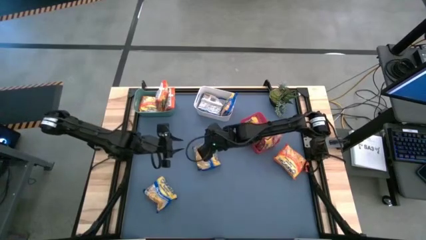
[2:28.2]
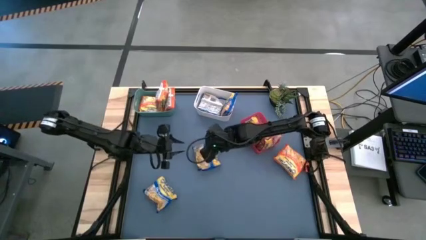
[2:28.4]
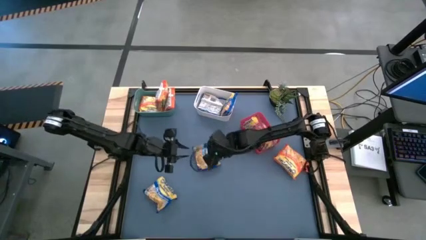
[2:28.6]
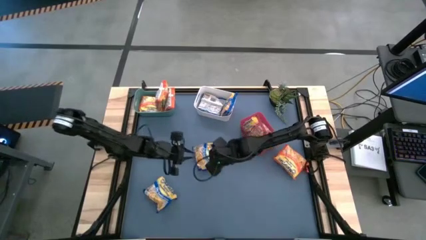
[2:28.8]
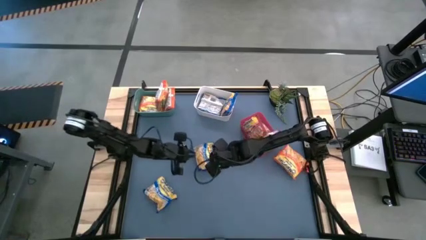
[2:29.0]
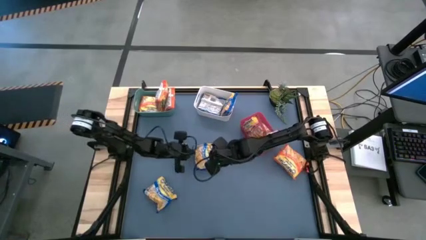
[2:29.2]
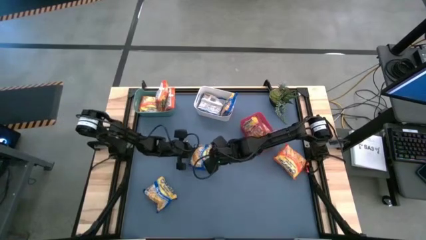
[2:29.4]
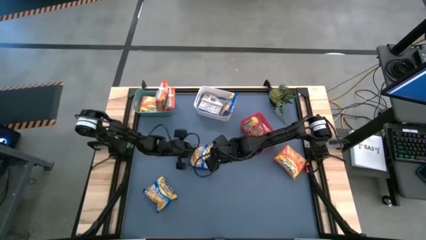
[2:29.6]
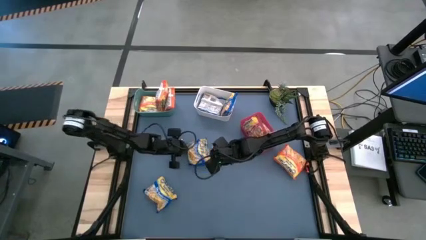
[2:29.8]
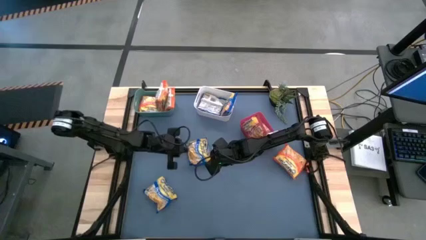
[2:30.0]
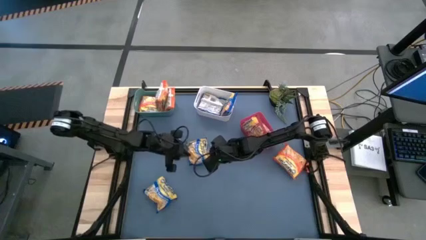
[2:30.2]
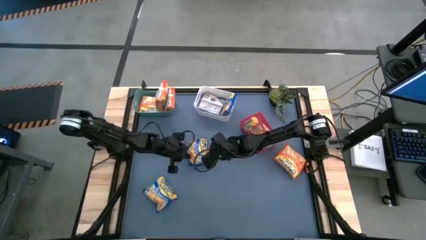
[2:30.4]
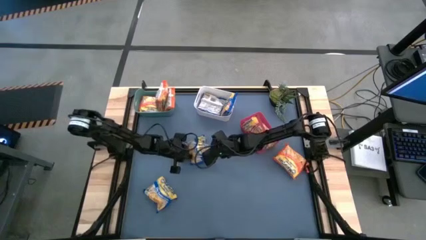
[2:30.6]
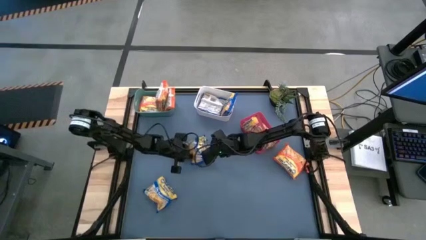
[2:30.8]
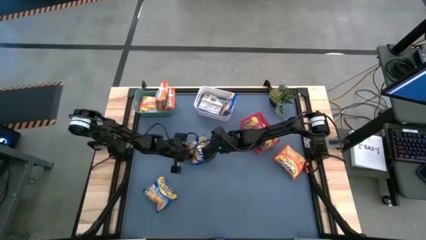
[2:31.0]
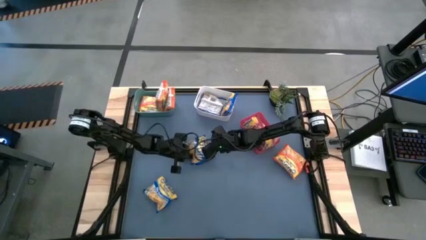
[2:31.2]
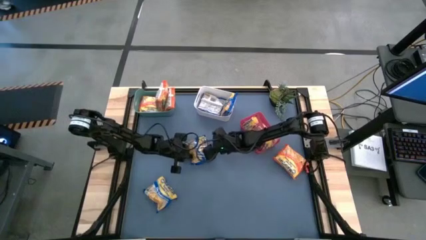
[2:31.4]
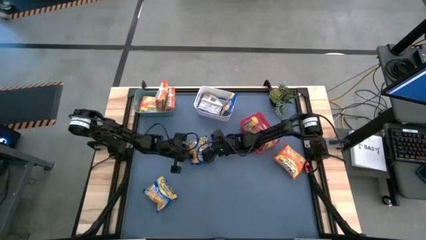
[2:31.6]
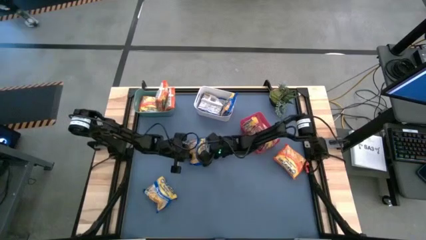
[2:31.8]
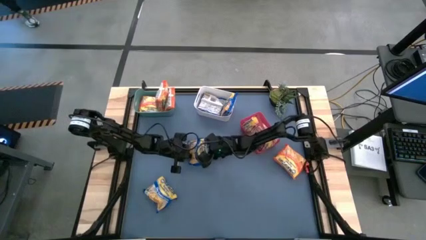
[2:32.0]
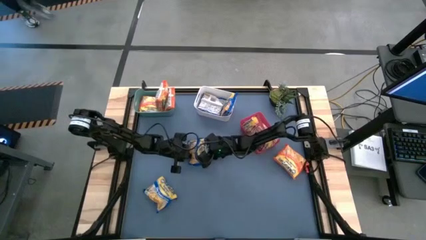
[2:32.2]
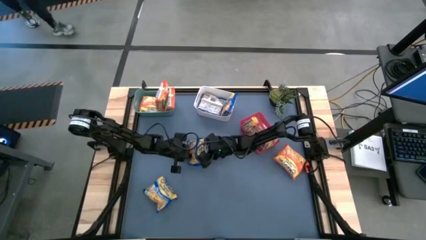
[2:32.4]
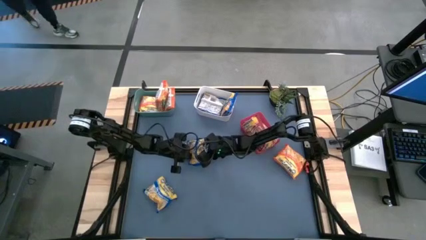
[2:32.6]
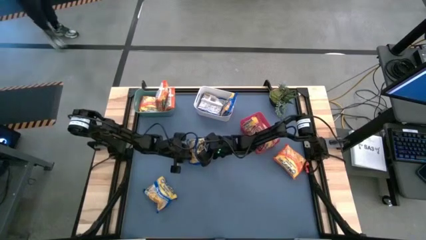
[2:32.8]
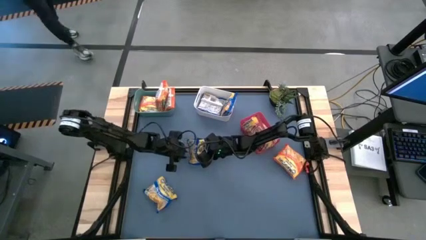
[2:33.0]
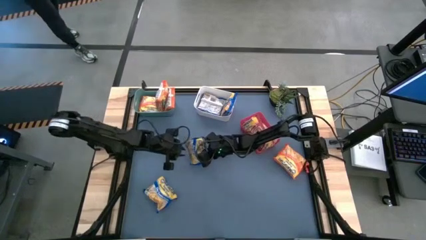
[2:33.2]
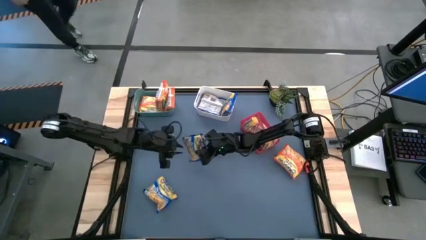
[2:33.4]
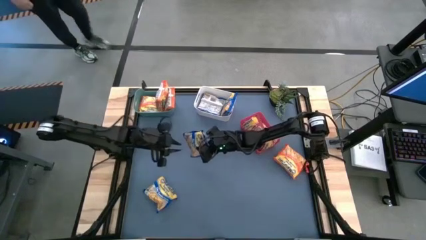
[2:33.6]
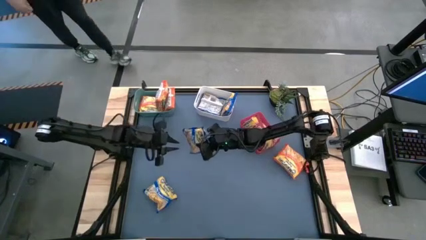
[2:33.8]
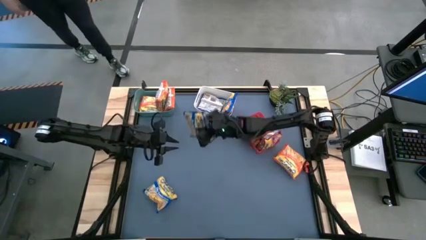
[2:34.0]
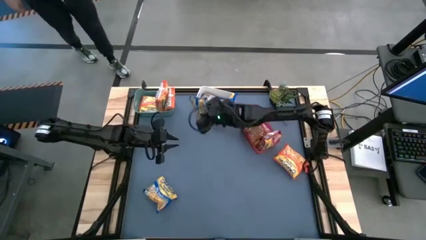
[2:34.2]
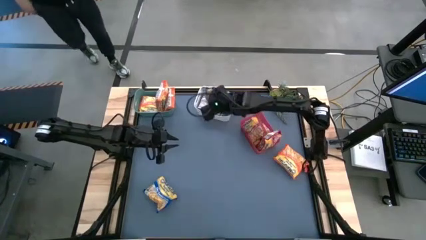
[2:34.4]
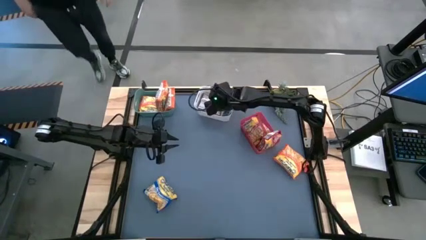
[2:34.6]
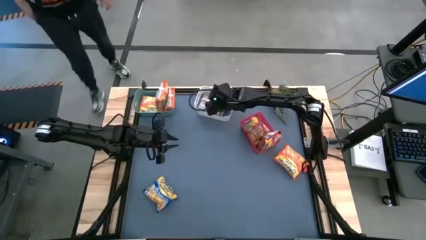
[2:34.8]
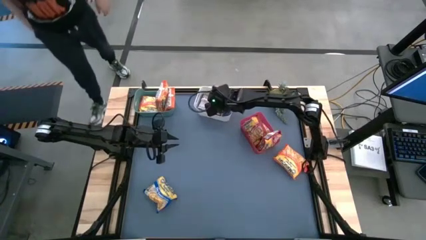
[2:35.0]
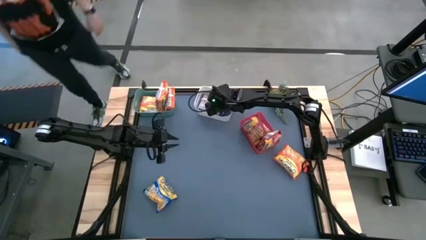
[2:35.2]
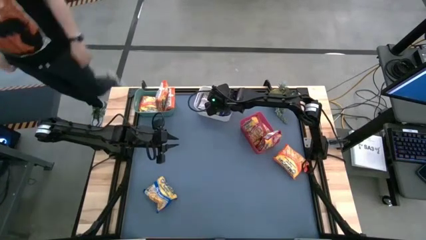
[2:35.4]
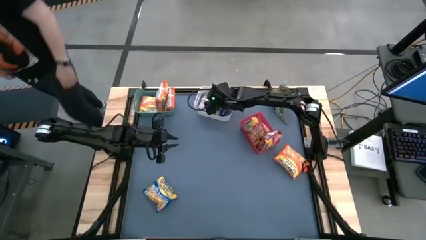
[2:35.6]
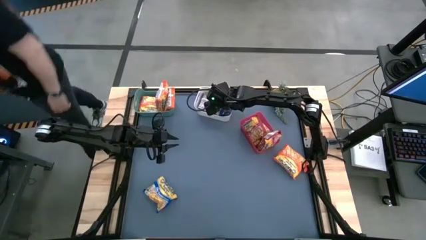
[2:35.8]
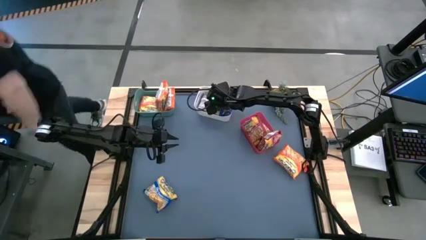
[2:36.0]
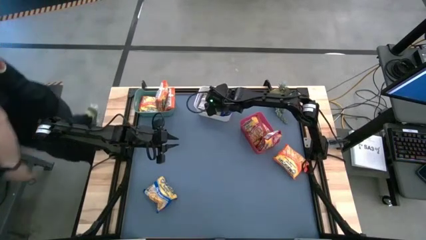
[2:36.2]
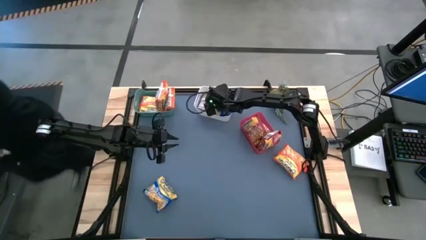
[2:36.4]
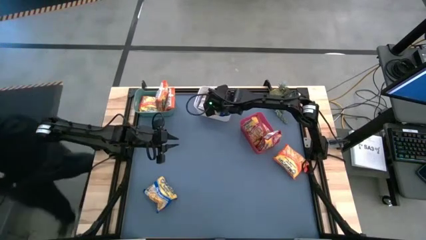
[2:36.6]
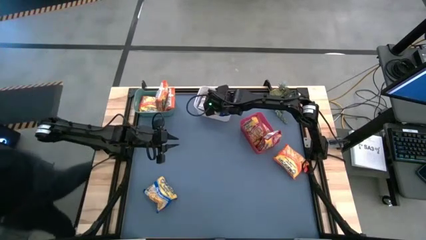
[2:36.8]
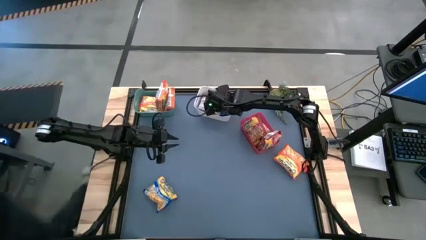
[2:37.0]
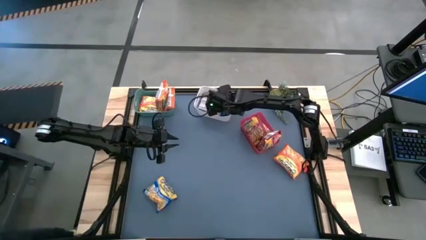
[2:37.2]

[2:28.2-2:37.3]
Task: Sort Maruchan noodles
Put the blue noodle pack into the white bin

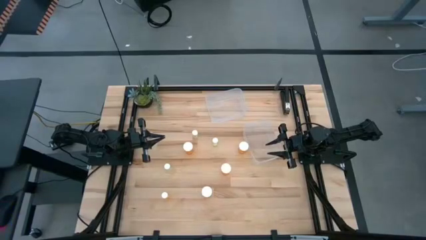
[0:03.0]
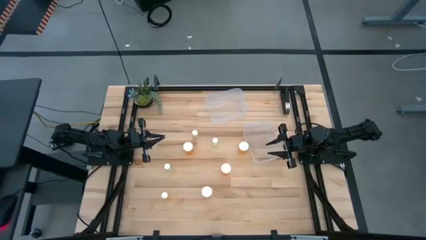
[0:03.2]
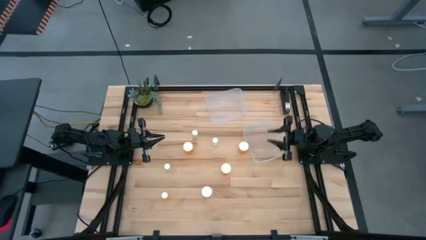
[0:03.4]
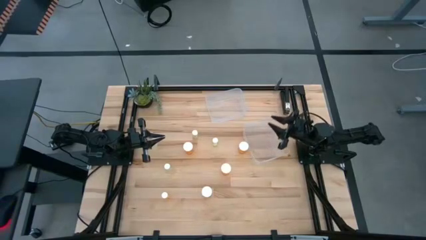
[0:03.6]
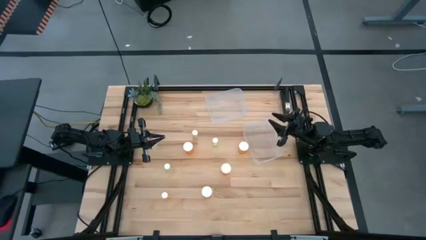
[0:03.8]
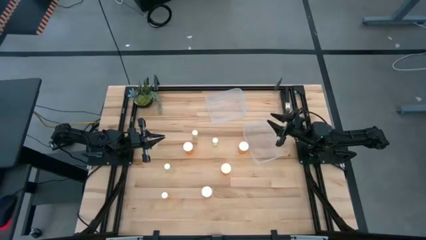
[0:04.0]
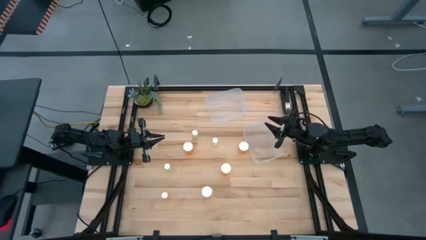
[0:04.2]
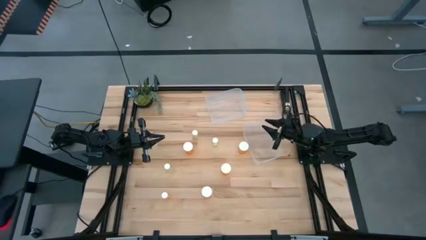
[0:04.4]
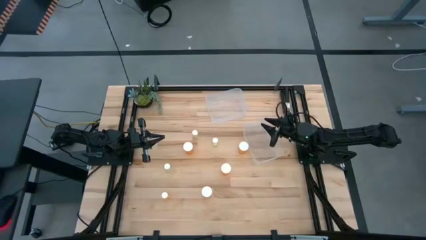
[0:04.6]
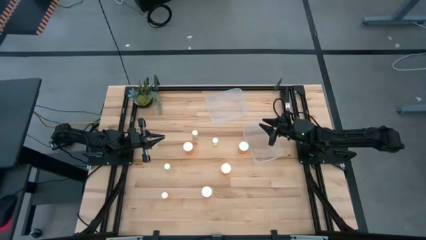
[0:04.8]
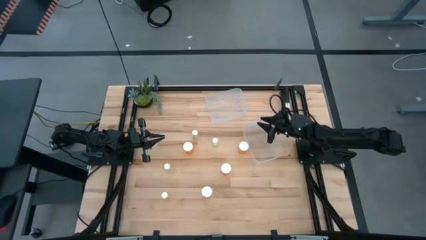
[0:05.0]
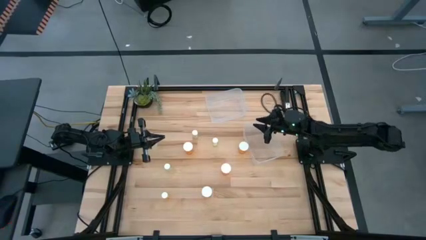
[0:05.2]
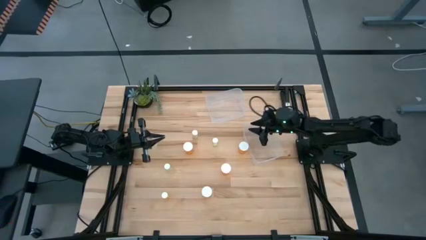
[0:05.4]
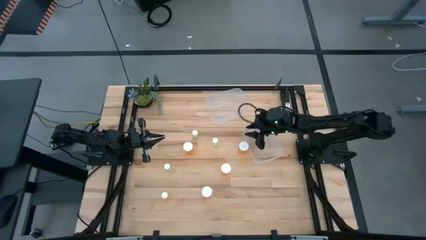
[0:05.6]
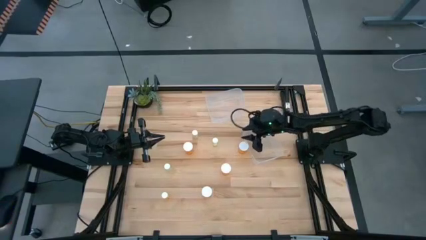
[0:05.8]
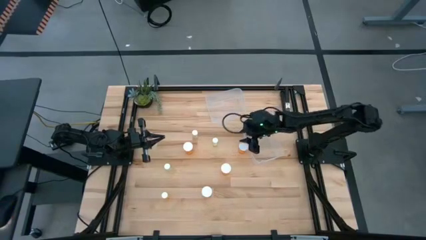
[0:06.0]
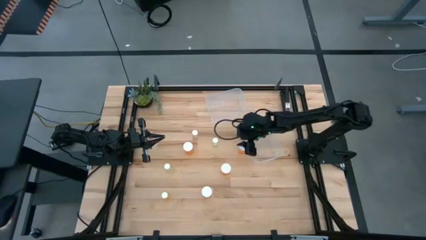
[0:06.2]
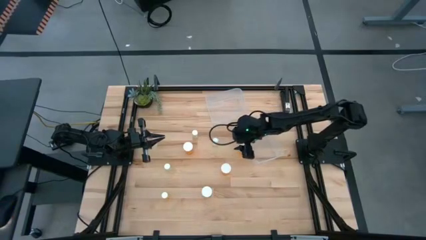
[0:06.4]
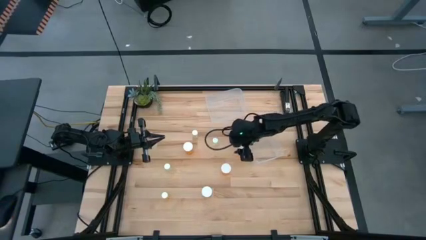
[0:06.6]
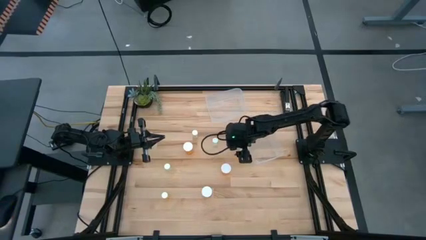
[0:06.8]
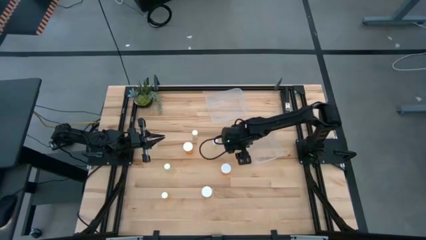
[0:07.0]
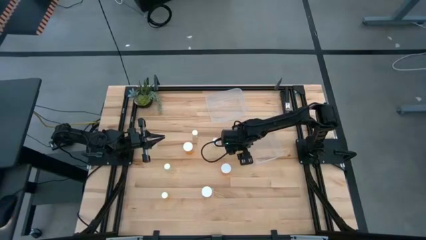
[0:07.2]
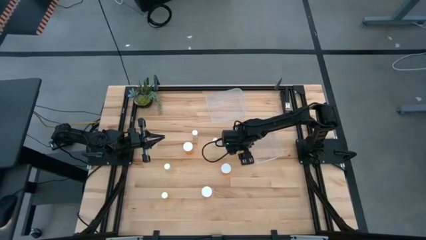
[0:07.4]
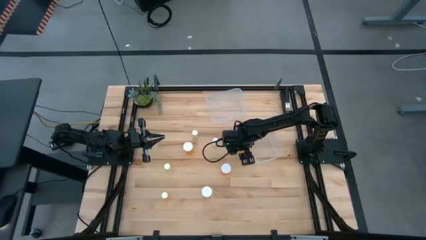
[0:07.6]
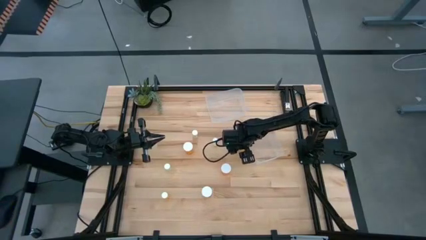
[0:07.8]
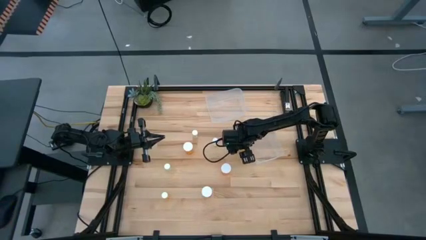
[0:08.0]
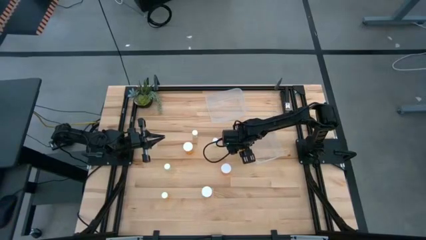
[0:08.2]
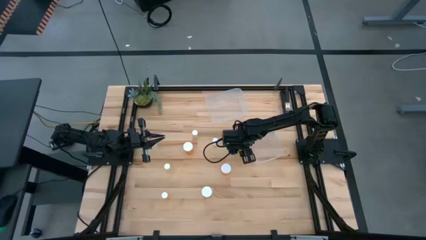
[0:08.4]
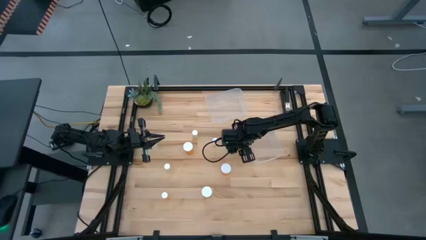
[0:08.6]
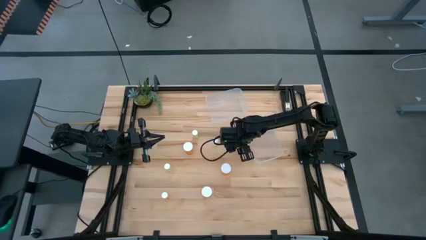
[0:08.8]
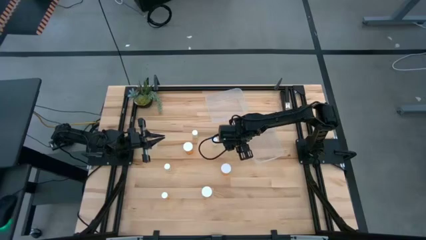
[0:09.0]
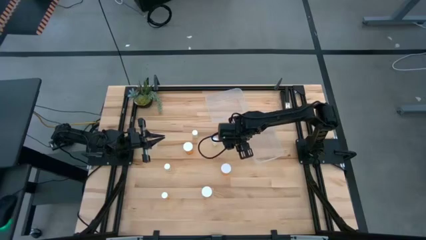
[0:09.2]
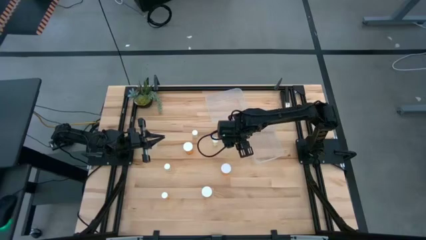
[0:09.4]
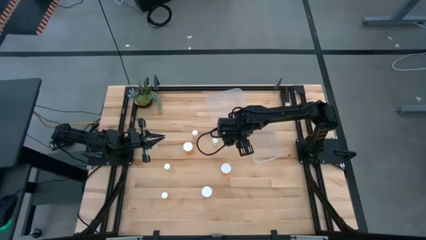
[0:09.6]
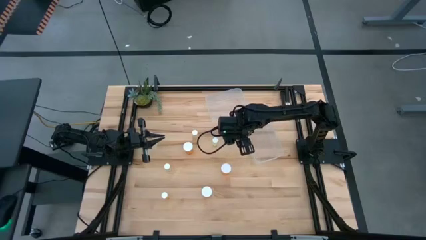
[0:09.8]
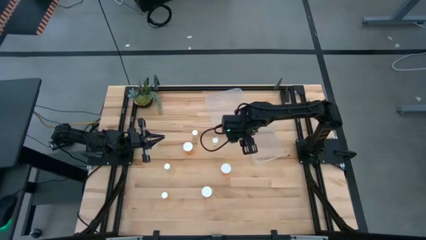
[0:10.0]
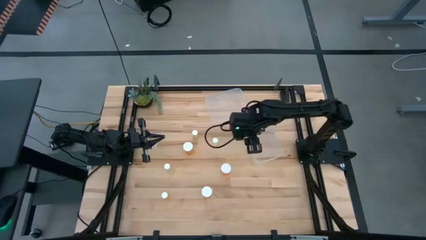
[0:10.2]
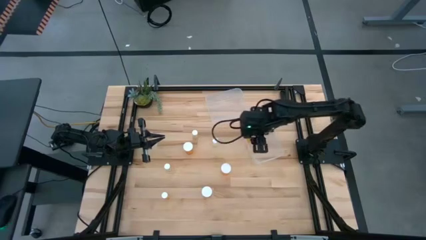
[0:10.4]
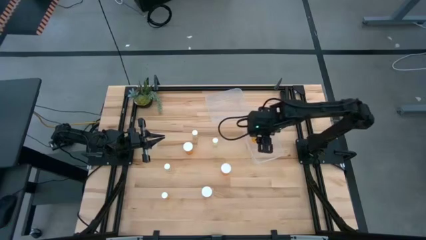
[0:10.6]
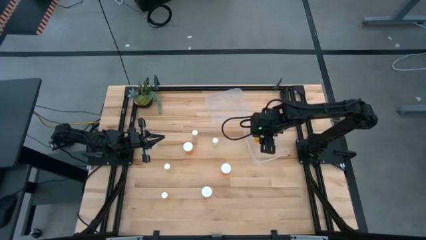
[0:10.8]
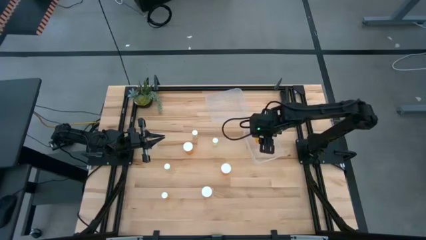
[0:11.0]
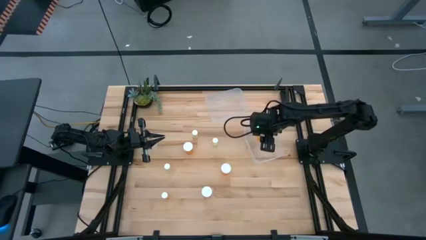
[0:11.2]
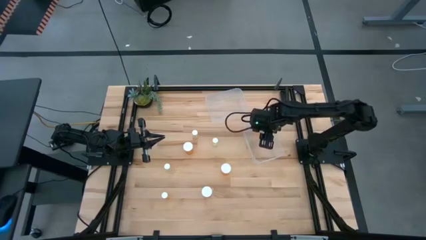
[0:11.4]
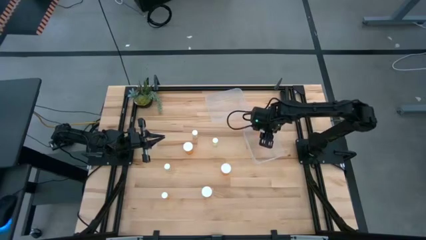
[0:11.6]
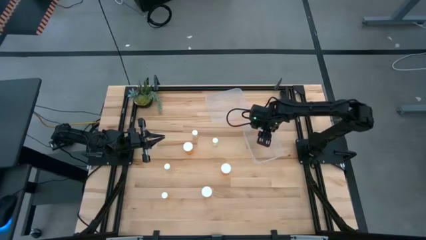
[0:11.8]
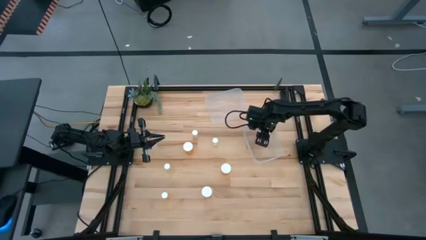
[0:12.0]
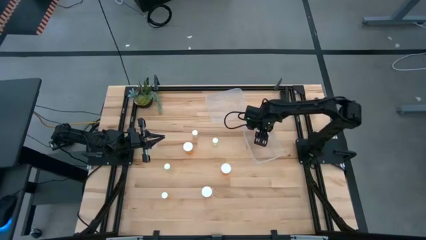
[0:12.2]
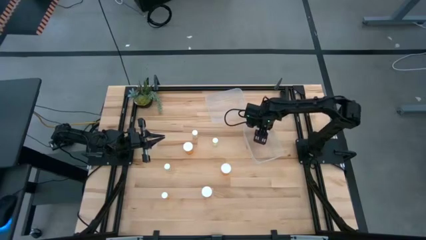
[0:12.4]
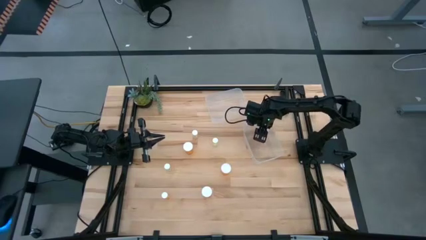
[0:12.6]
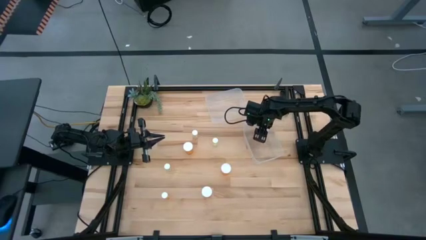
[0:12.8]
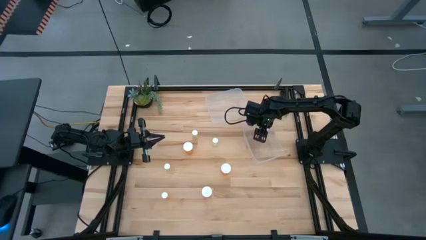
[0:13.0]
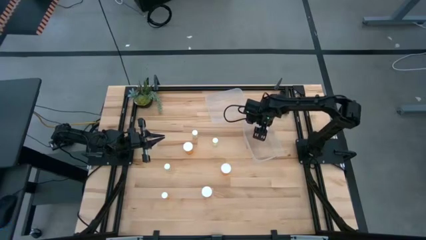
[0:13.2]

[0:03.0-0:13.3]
Task: Pick and place medicine bottles into bin by pill shape (circle, oval)
Put the top right big orange pill bottle into the bottom transparent bin
